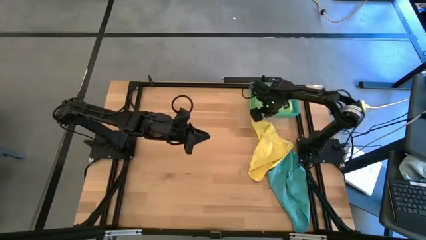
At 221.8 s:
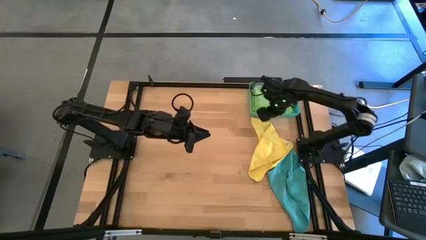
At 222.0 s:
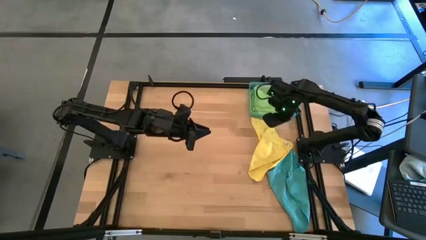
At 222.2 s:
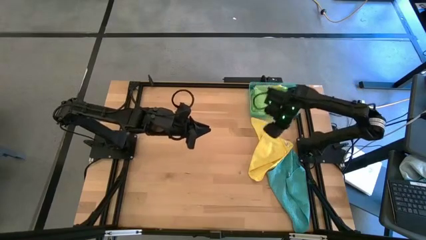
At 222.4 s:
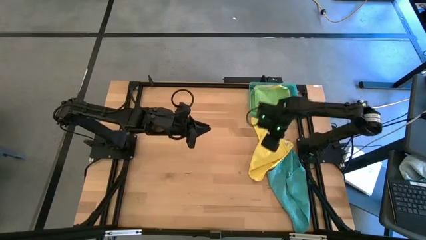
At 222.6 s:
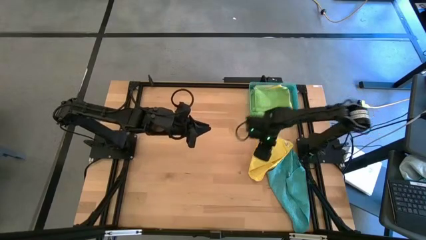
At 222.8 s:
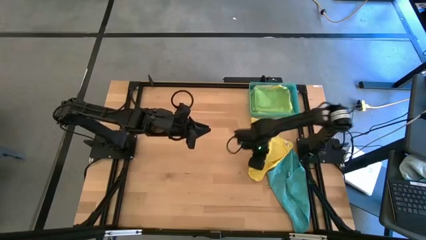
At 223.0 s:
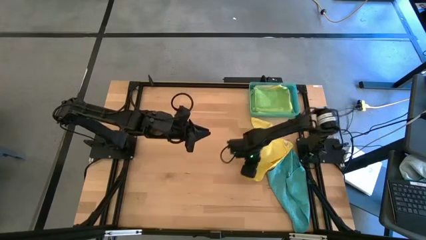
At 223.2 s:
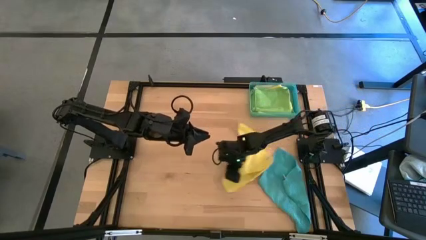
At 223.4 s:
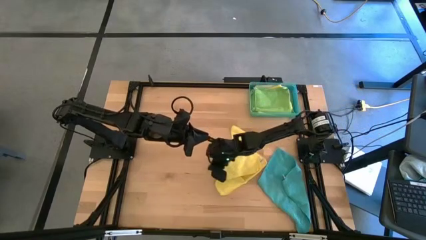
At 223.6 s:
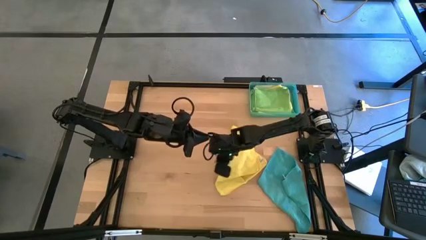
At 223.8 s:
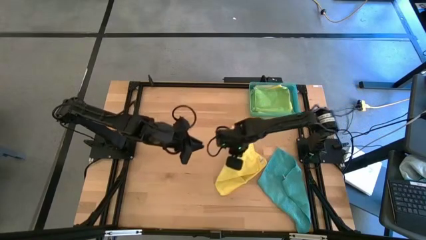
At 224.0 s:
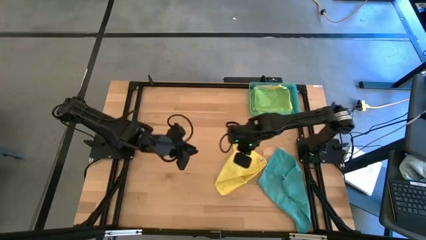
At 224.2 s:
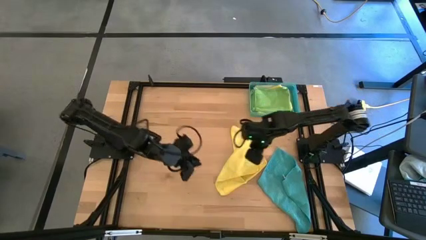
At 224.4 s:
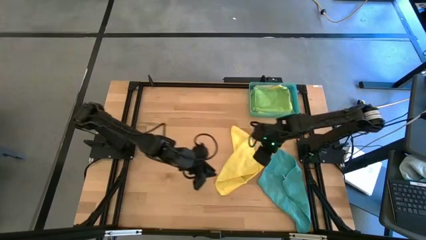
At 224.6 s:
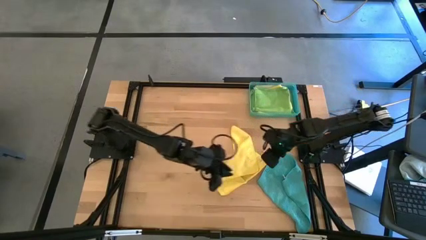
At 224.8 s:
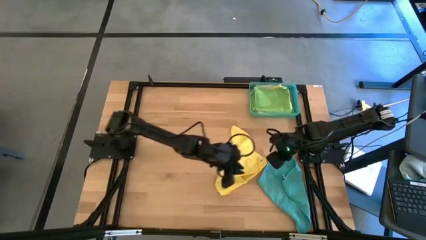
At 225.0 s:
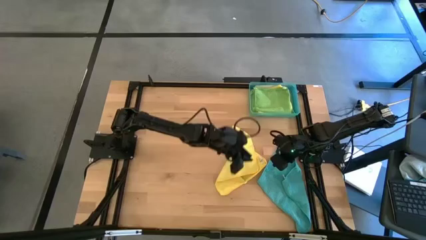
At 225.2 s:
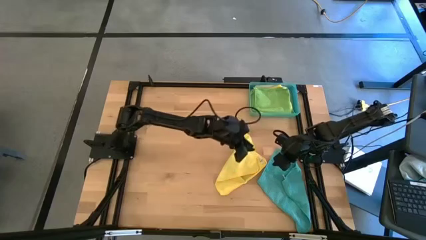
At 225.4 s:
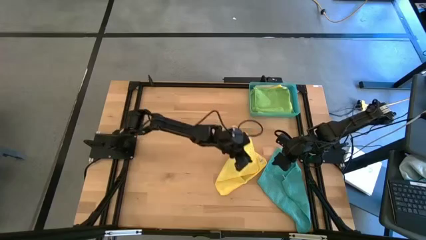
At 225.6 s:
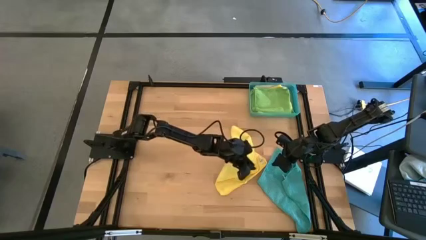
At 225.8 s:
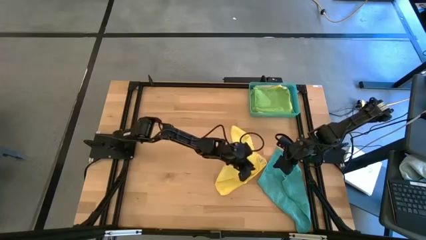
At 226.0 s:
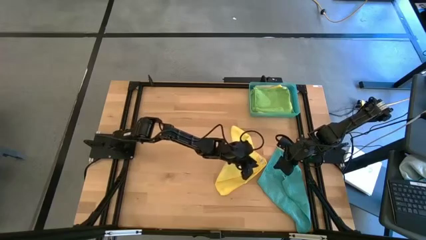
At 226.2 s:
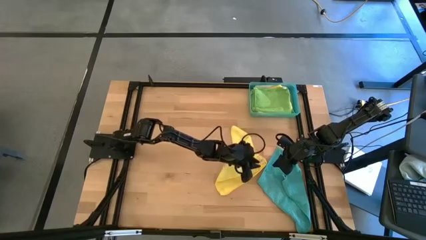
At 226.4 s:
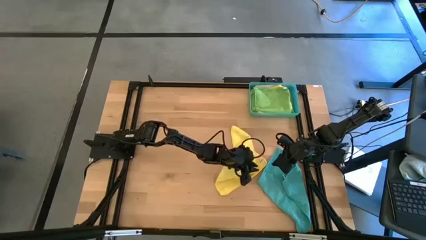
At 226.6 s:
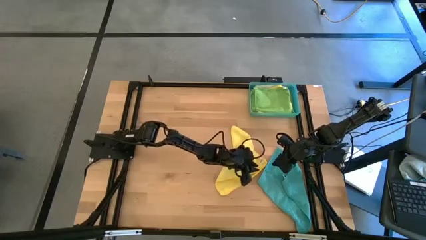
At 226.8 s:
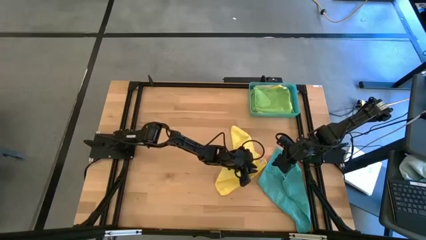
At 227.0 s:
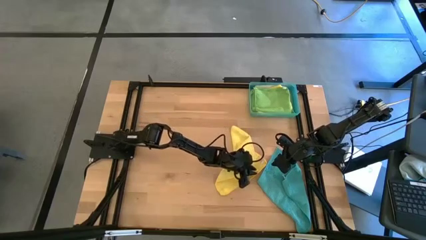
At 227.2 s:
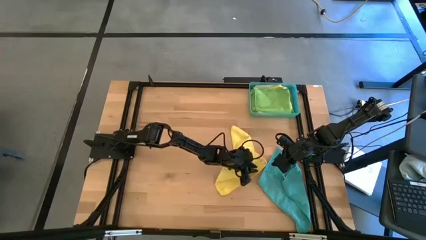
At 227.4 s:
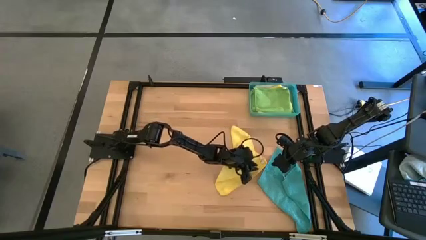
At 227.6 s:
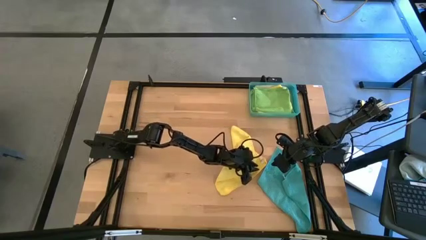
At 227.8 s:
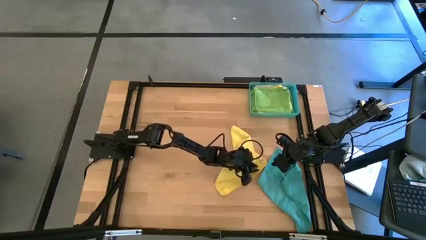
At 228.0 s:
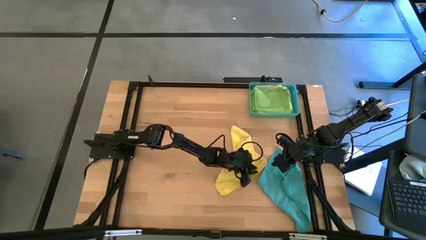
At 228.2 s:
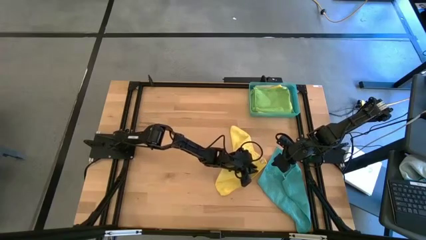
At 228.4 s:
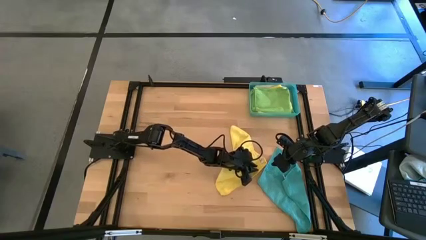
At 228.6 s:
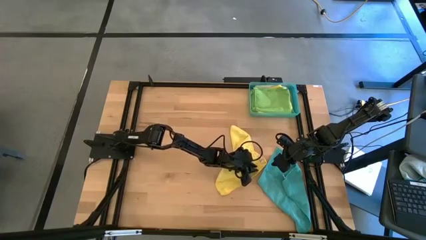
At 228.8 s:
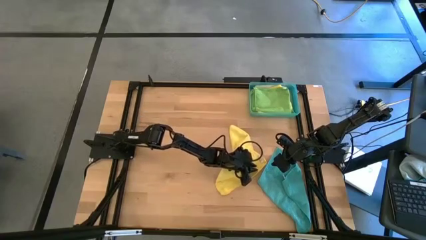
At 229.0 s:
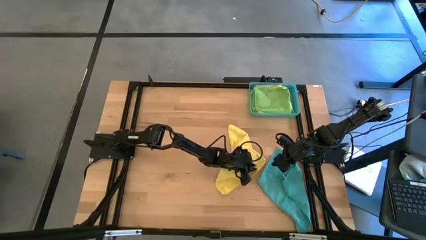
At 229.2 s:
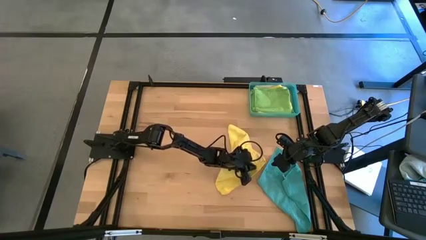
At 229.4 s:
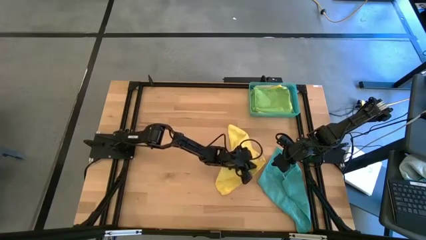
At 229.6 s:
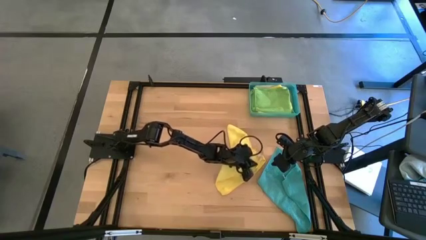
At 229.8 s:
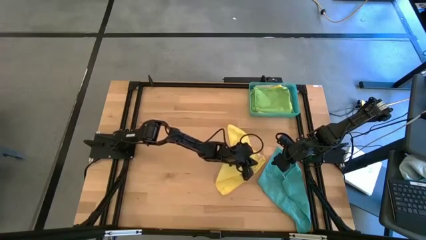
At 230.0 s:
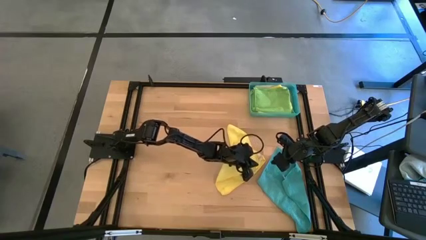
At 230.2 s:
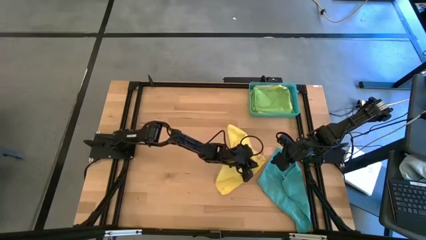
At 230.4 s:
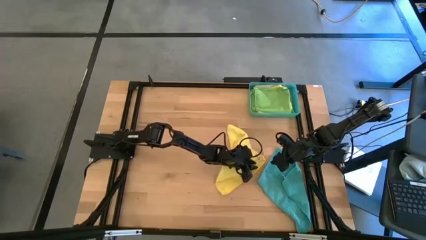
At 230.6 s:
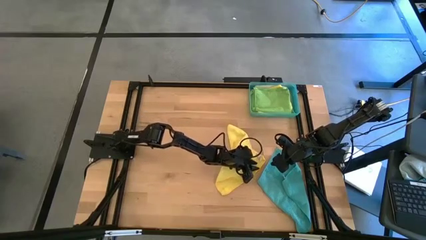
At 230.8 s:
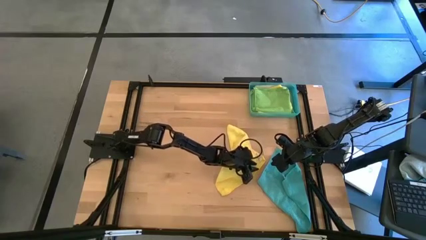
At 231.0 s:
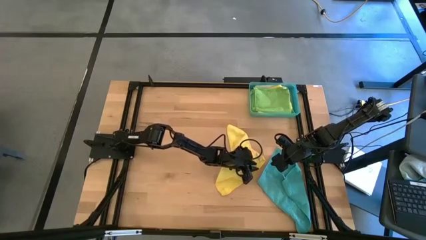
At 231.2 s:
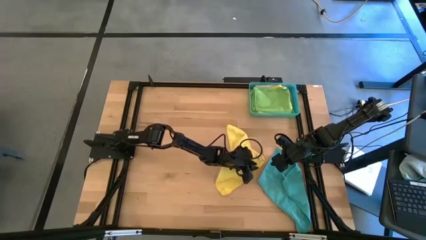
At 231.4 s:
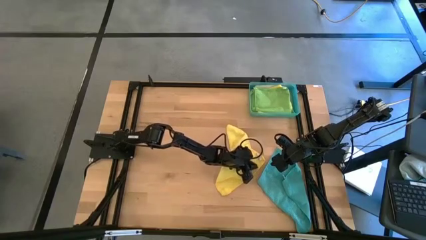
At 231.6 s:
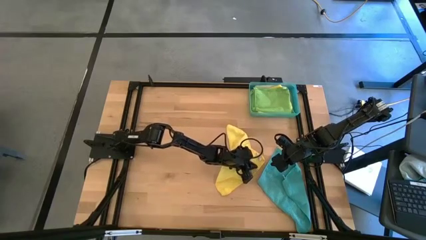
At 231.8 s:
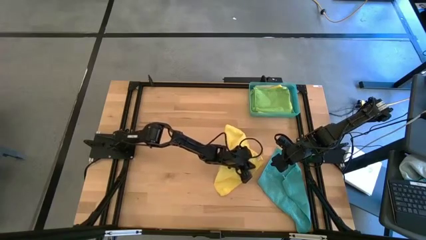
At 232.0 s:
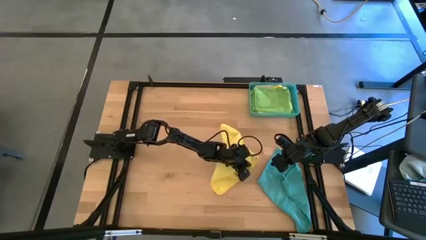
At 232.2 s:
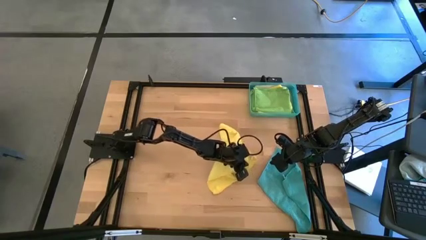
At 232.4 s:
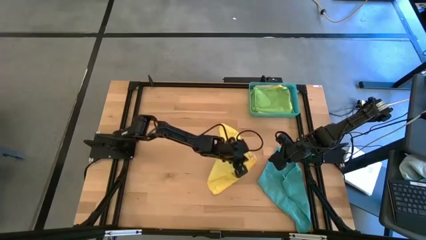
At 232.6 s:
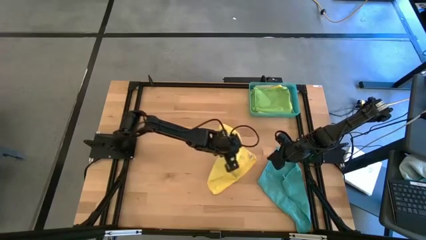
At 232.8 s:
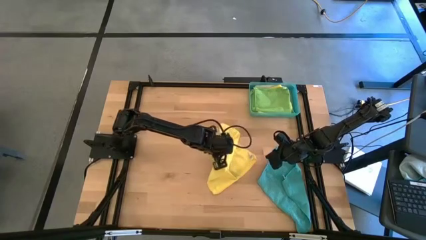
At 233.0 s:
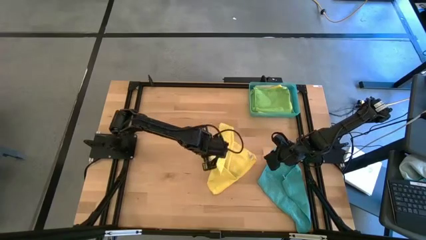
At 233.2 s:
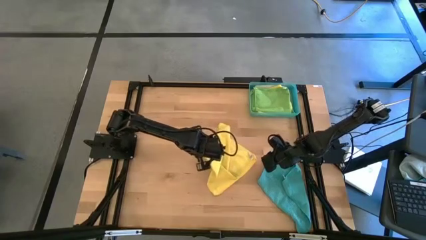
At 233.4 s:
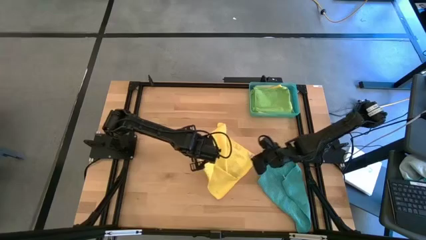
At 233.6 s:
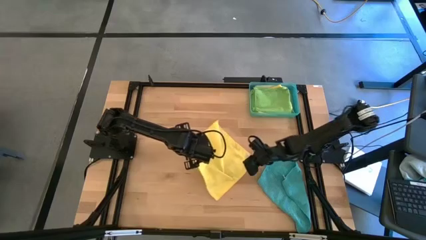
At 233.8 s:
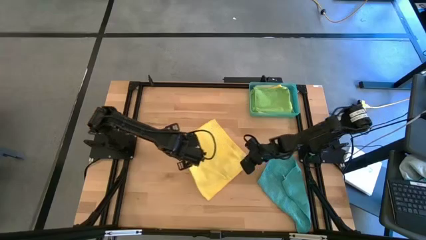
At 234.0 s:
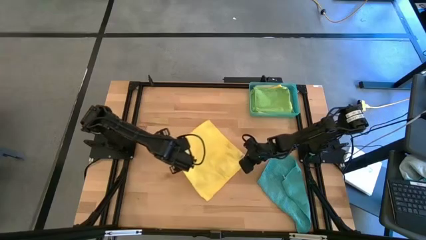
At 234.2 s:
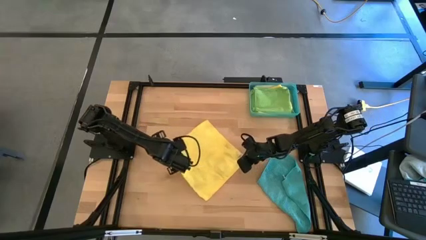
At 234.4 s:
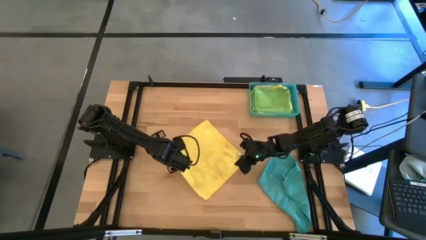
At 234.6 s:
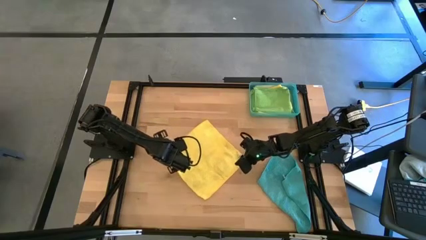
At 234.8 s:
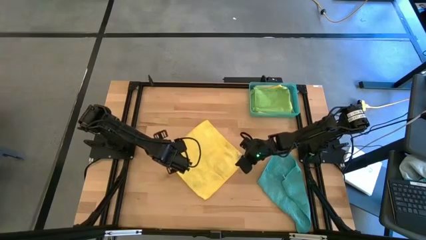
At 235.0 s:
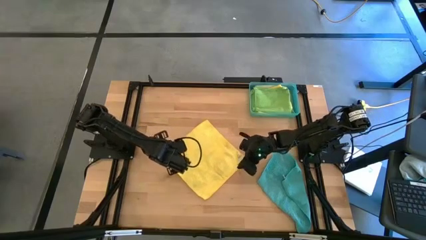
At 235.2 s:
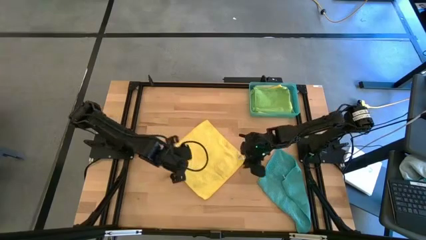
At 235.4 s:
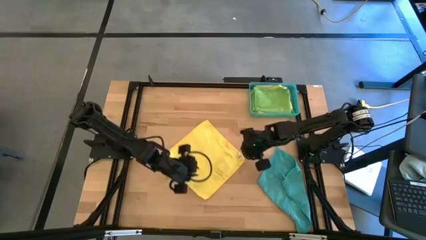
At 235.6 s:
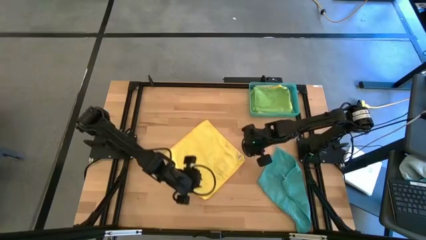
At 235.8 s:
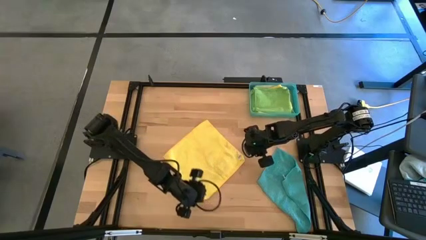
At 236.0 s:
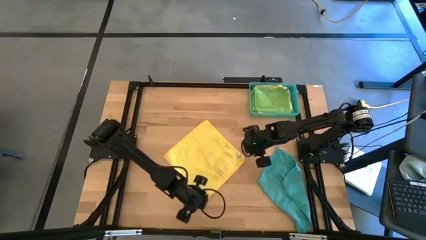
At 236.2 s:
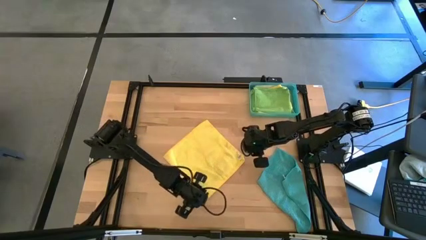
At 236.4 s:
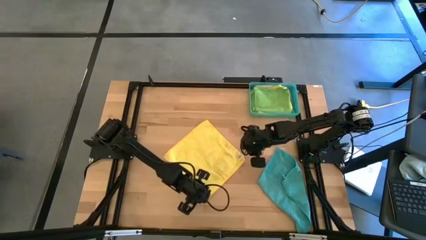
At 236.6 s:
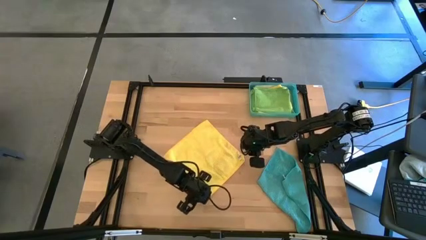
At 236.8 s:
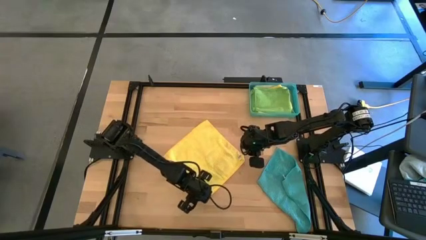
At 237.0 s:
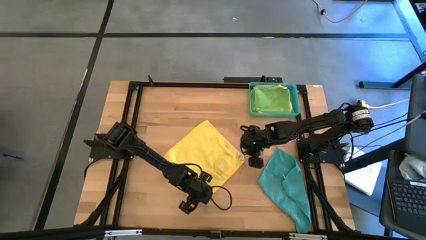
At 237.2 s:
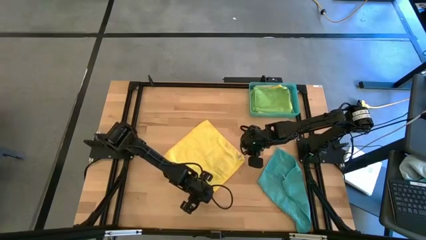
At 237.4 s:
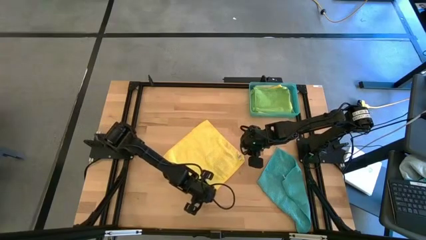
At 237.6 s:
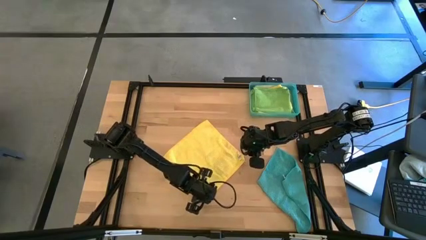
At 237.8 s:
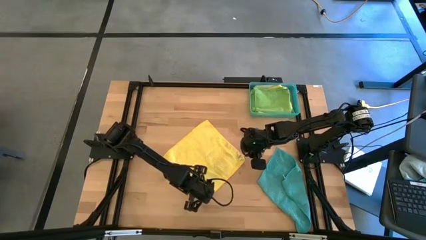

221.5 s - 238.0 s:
Task: Fold microfiber towels
Fold the yellow microfiber cloth
